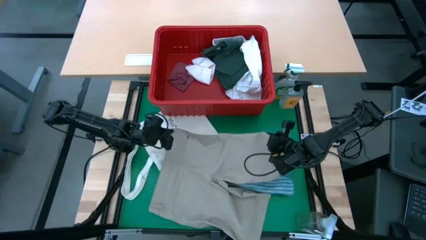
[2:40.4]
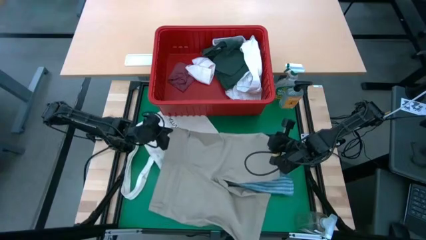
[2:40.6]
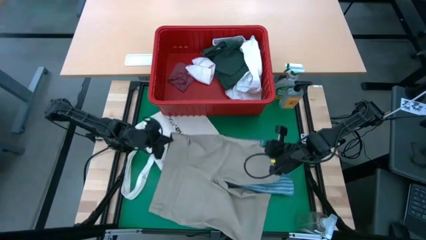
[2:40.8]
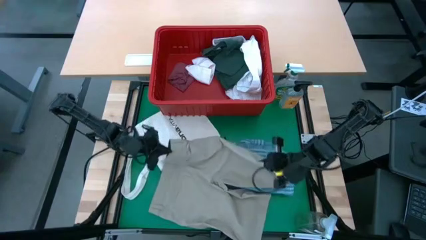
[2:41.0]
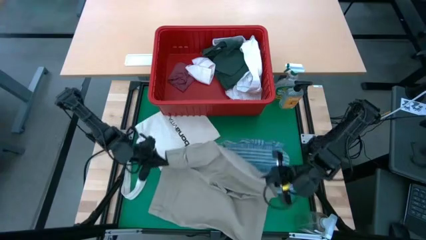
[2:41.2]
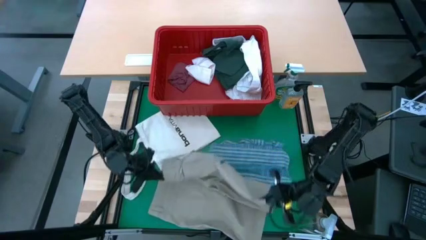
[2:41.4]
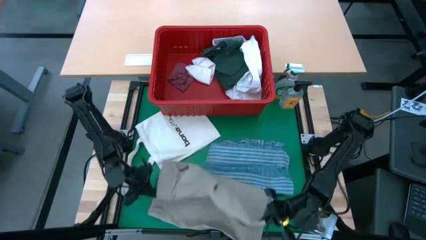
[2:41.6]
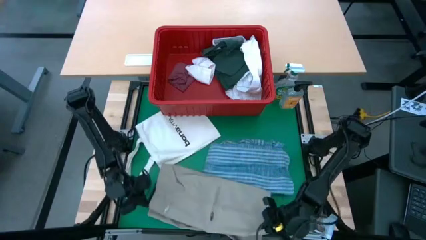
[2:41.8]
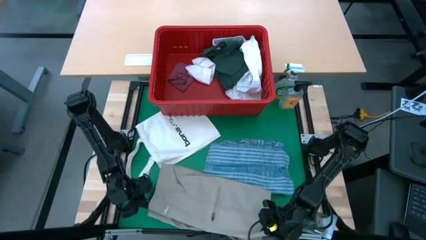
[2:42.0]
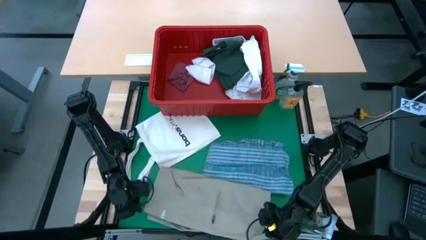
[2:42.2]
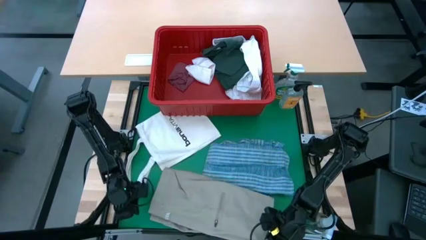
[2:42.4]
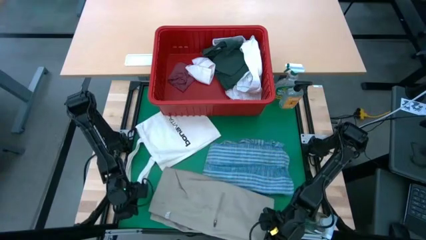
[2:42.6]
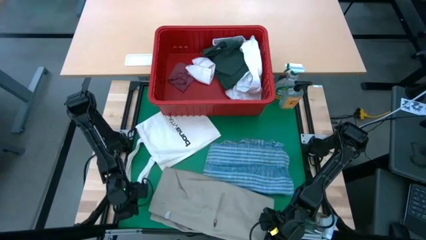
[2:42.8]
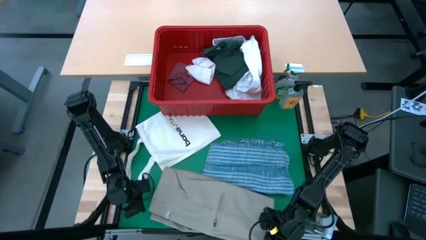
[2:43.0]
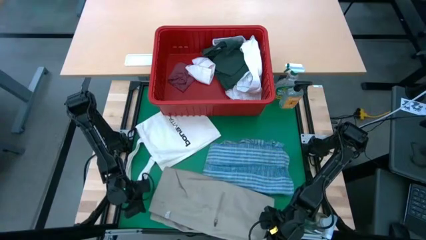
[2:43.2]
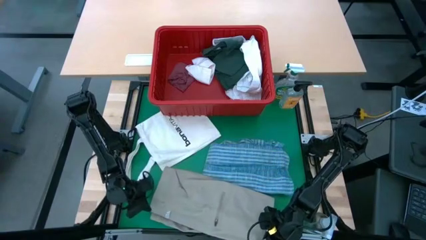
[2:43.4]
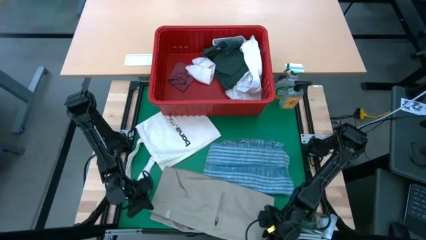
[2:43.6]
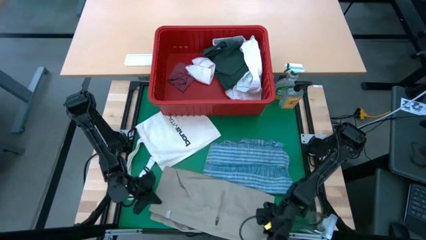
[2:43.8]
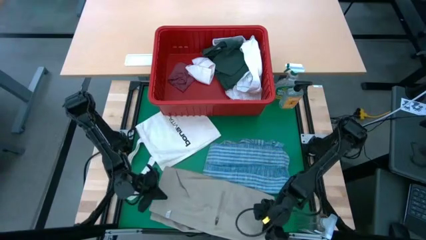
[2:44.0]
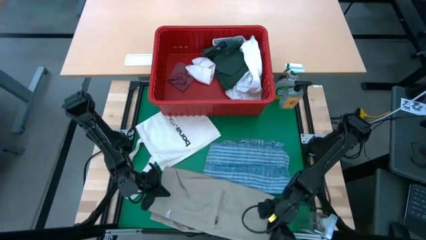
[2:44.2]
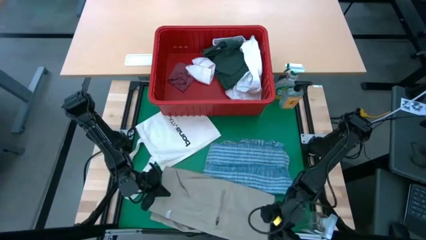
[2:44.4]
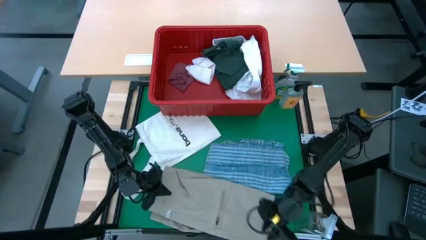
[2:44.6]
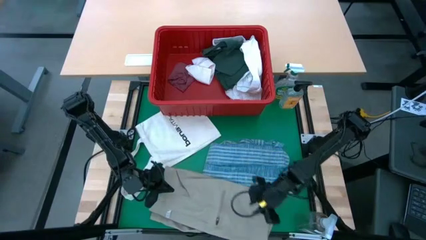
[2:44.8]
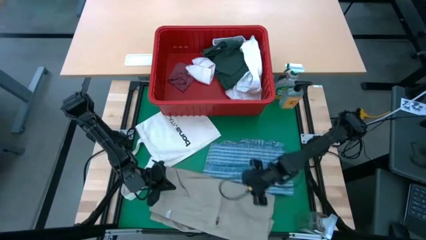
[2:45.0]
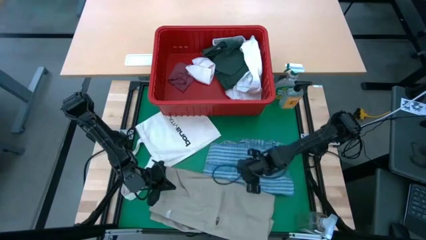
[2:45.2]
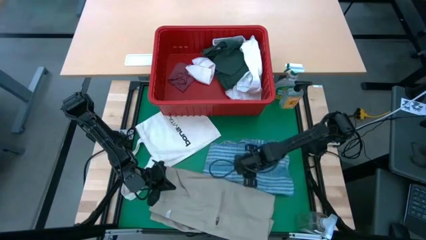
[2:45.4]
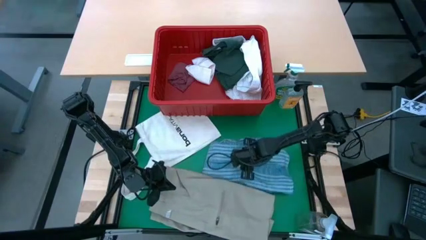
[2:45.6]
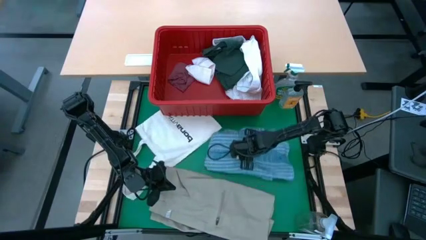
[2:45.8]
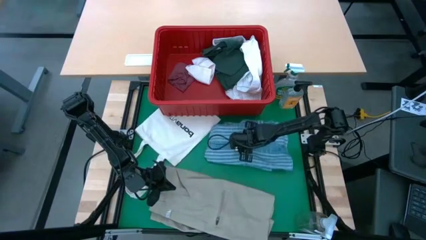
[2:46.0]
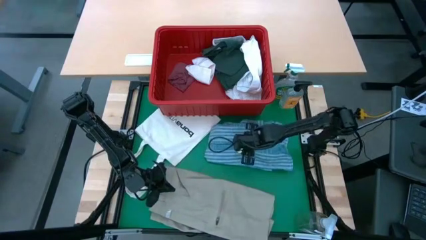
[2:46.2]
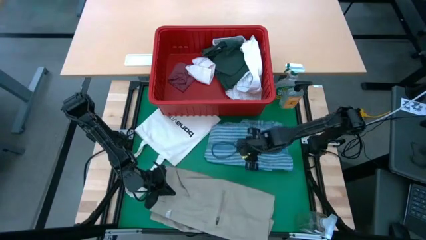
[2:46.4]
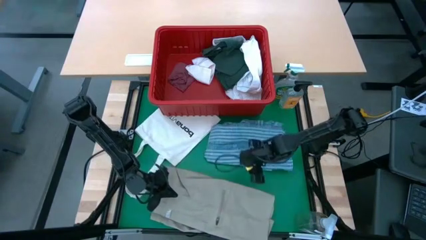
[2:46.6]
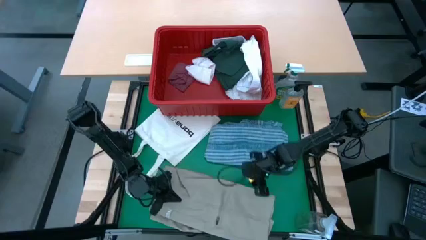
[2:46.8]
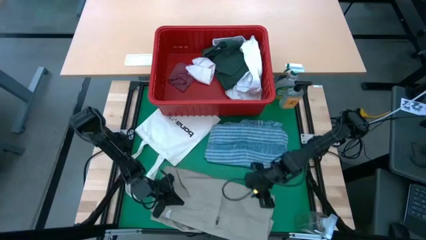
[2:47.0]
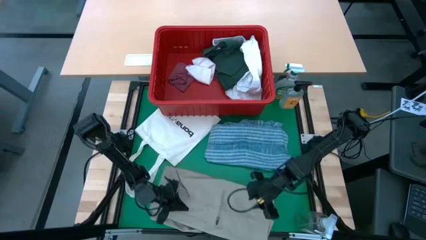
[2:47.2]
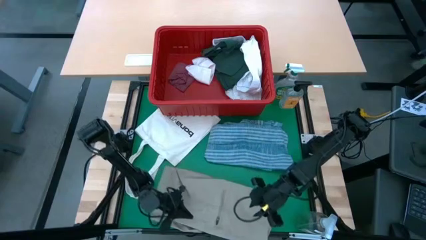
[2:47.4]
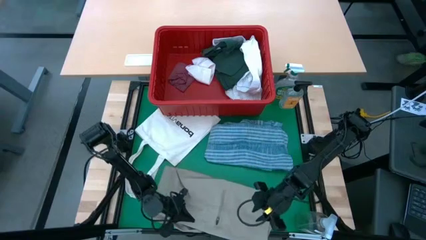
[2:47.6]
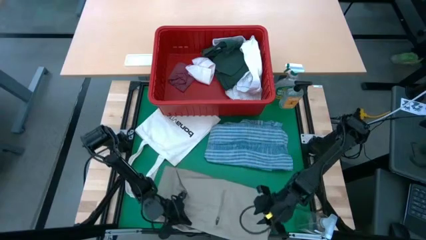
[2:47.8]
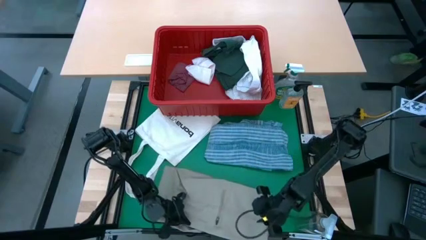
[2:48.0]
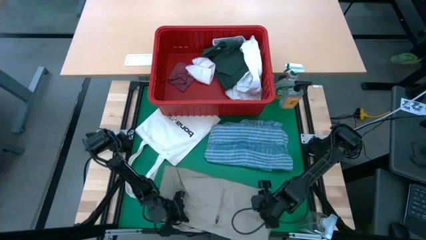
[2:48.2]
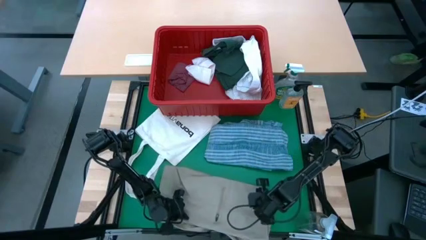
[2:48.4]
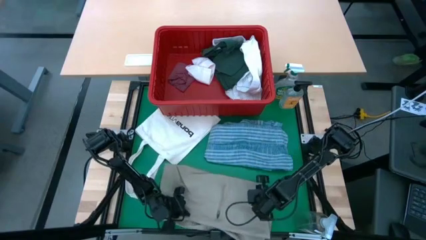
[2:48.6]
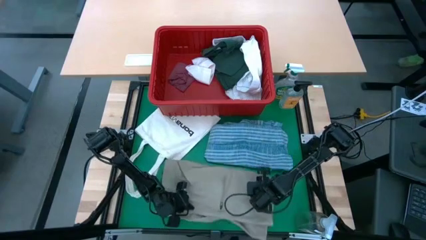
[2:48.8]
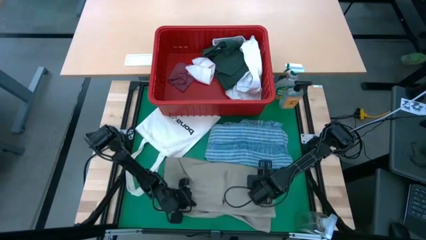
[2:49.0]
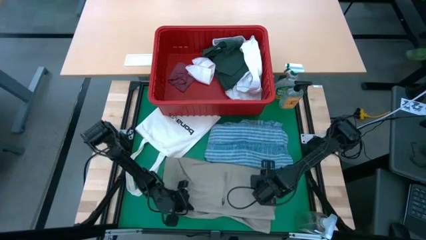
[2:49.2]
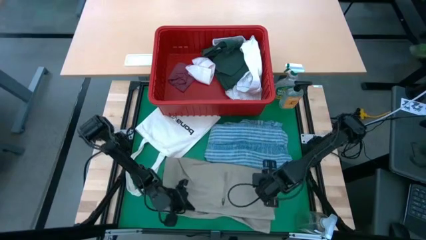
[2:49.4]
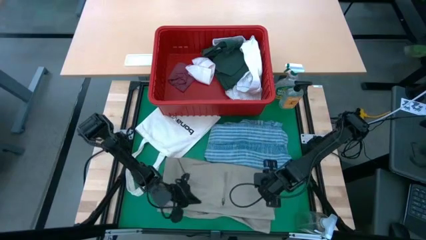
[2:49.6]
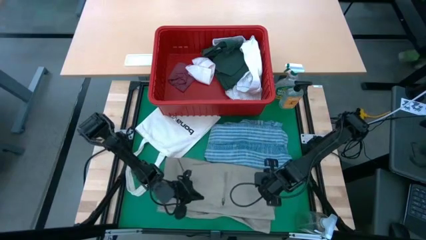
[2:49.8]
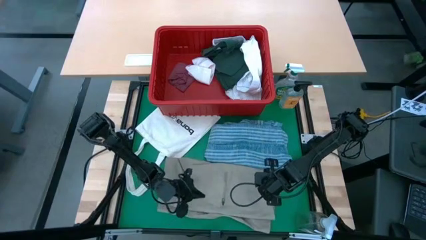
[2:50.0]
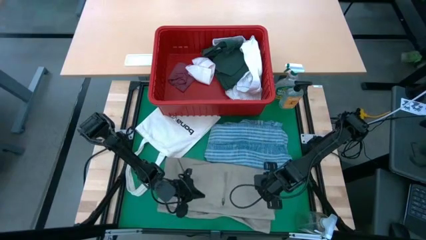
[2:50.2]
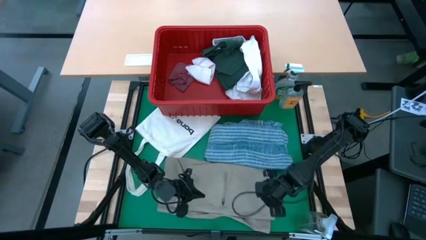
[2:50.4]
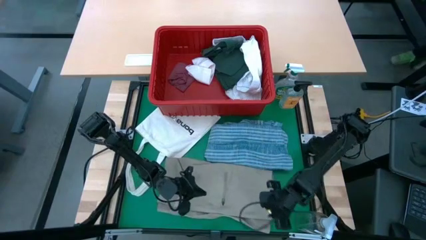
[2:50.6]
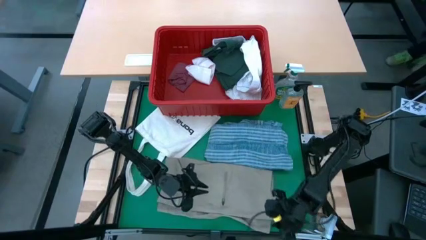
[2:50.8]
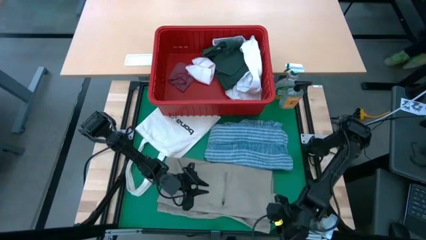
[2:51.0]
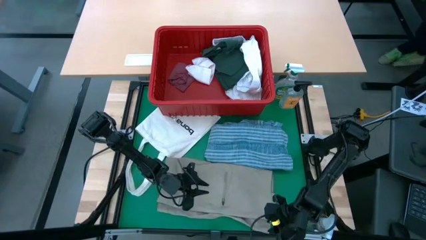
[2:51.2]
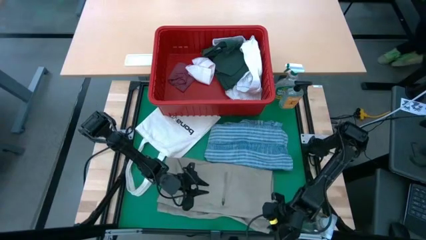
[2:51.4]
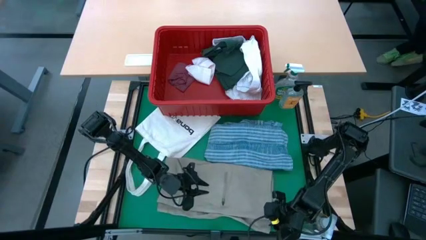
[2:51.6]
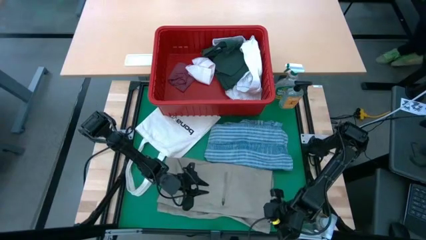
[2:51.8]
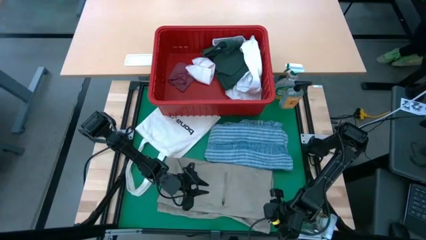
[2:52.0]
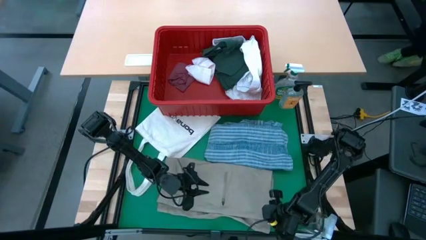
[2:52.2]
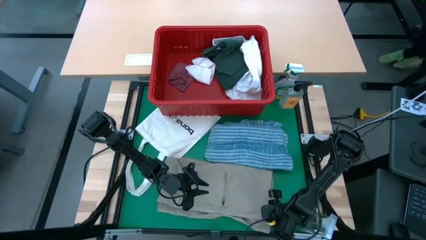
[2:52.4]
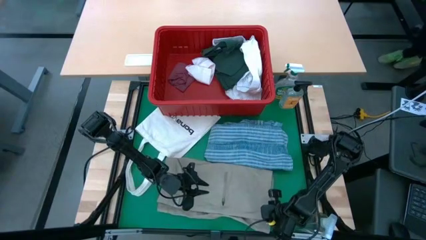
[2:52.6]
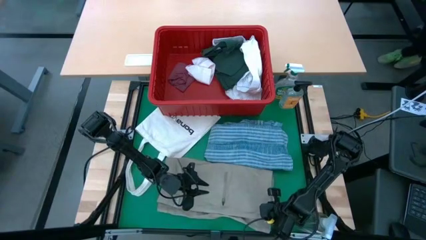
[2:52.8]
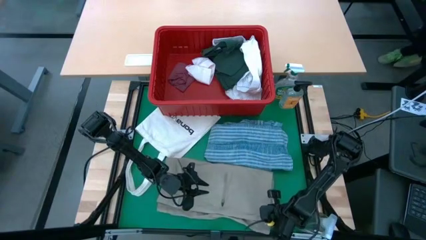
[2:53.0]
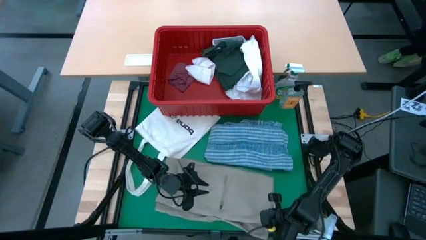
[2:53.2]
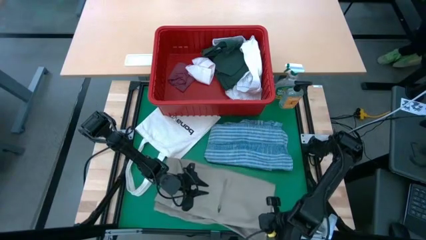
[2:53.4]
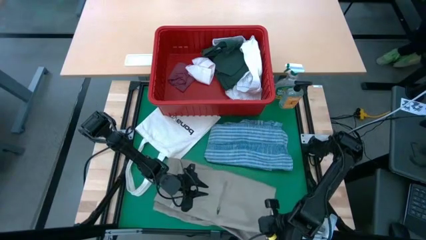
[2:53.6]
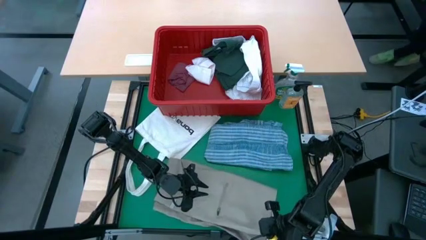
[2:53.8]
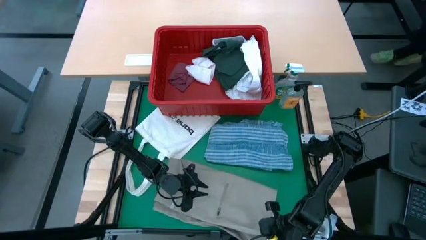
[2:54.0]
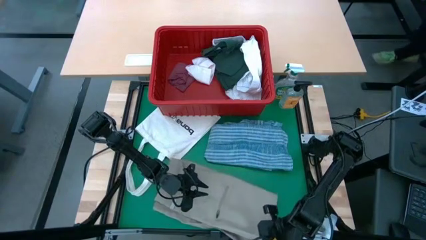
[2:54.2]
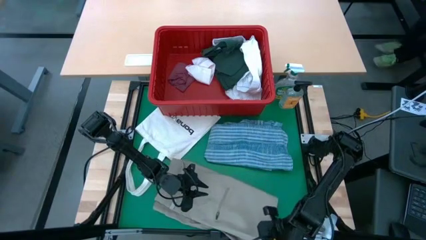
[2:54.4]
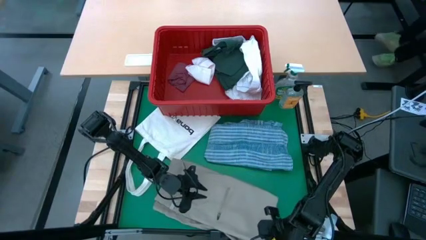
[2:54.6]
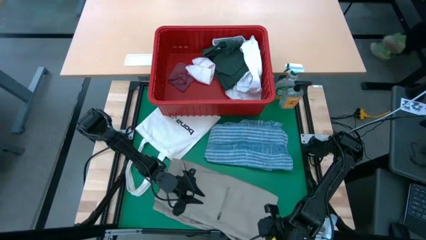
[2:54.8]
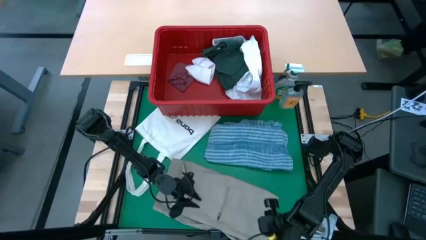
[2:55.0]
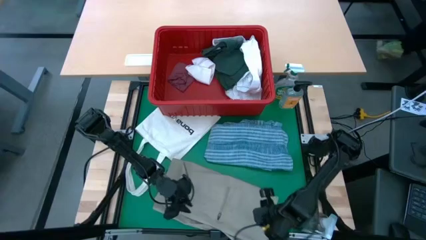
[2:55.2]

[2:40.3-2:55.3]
Task: Fold Laundry from Bin
Fold the brown shorts
